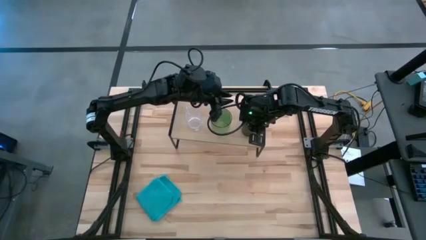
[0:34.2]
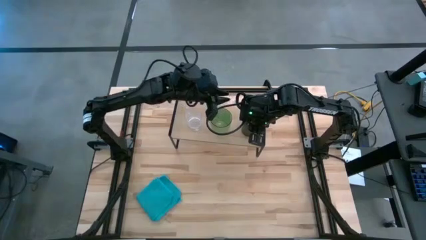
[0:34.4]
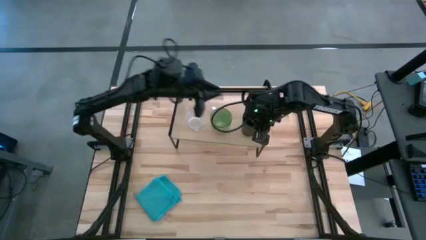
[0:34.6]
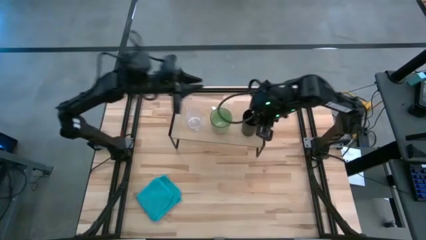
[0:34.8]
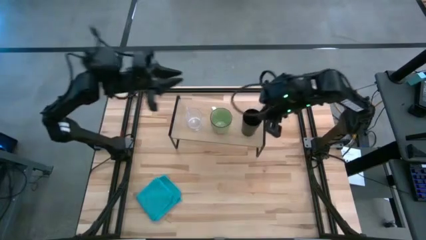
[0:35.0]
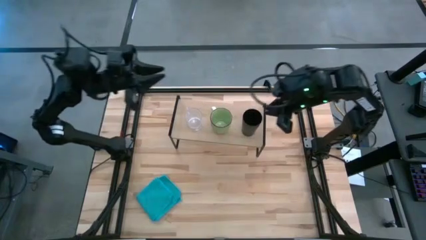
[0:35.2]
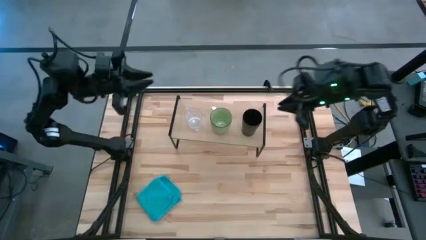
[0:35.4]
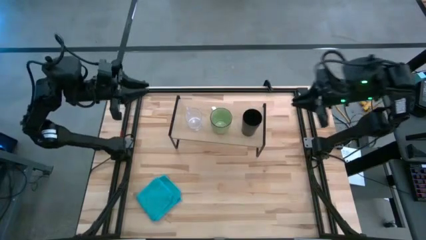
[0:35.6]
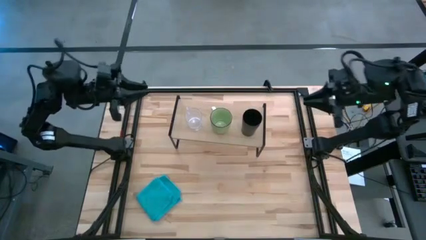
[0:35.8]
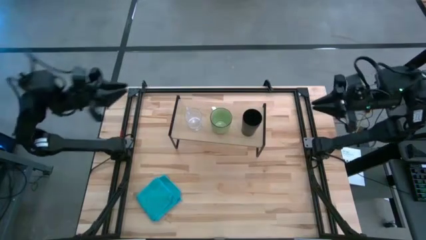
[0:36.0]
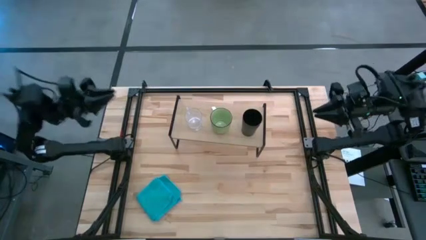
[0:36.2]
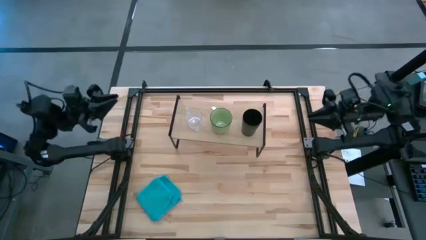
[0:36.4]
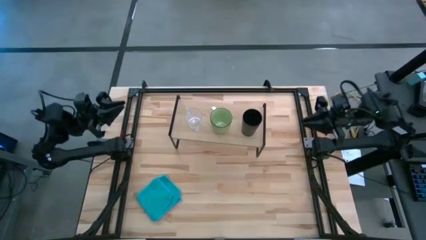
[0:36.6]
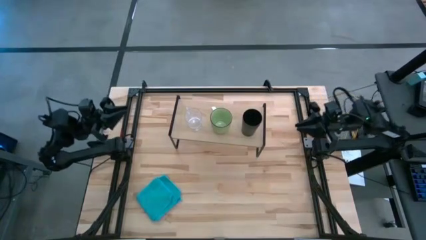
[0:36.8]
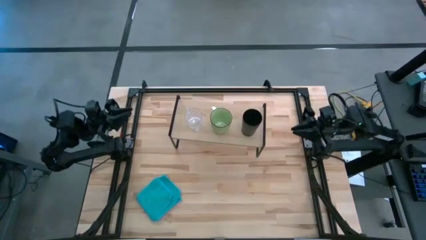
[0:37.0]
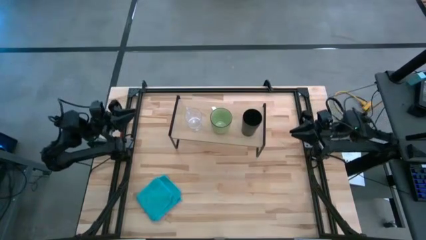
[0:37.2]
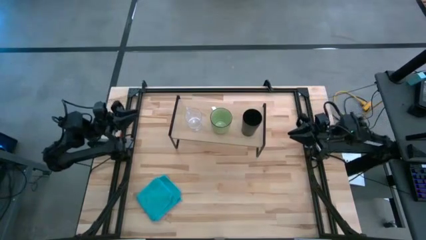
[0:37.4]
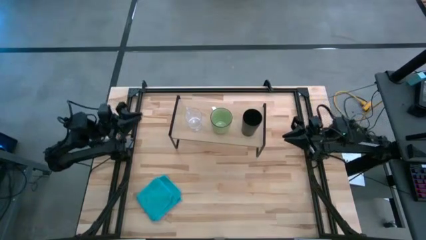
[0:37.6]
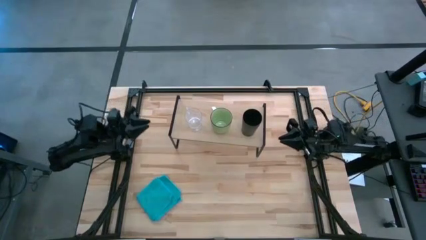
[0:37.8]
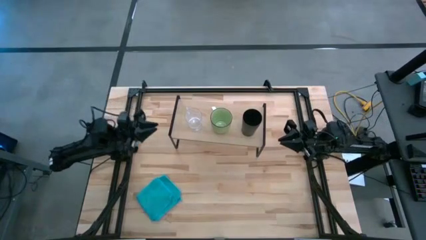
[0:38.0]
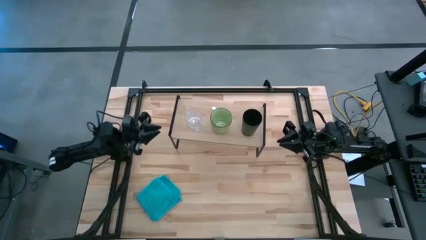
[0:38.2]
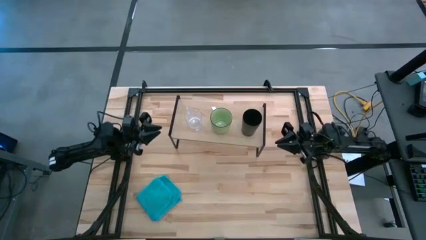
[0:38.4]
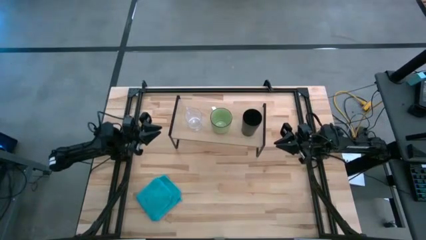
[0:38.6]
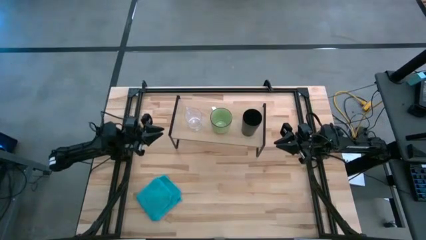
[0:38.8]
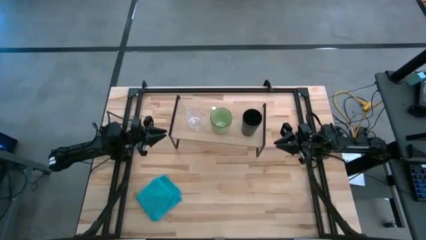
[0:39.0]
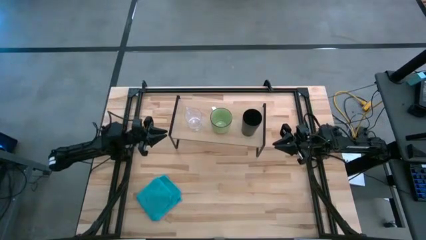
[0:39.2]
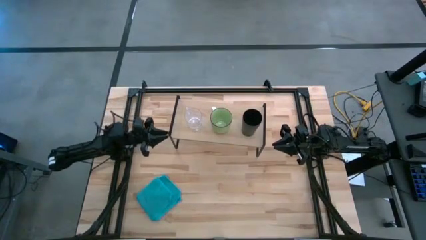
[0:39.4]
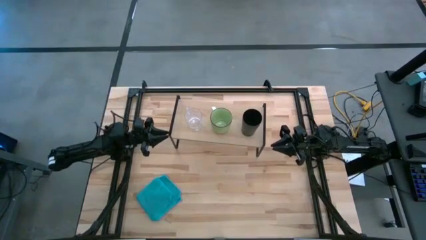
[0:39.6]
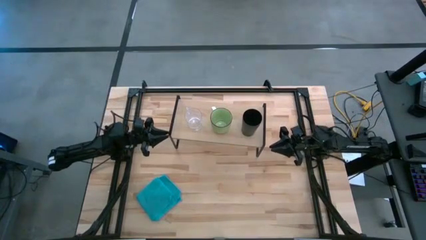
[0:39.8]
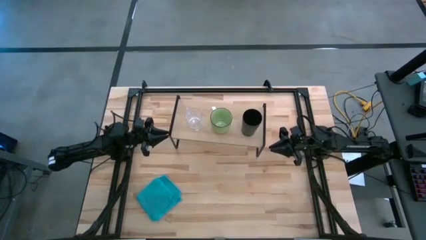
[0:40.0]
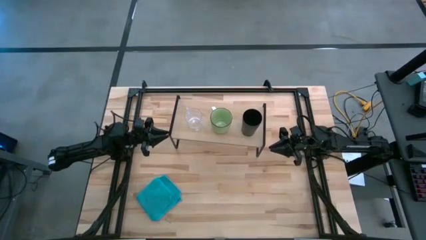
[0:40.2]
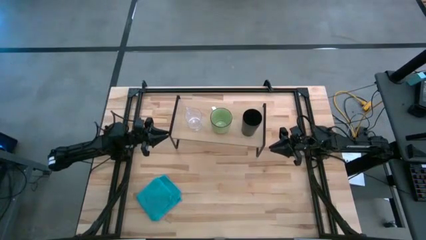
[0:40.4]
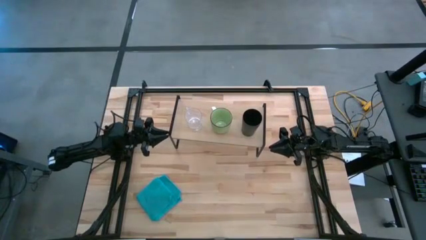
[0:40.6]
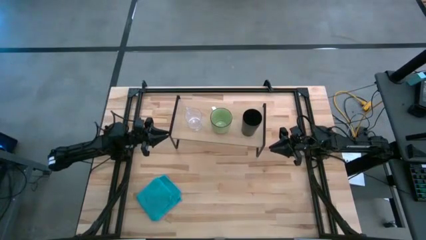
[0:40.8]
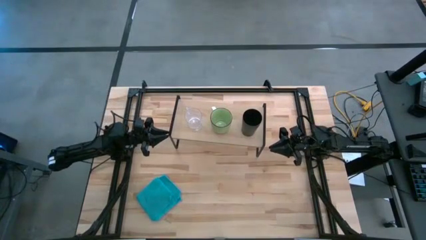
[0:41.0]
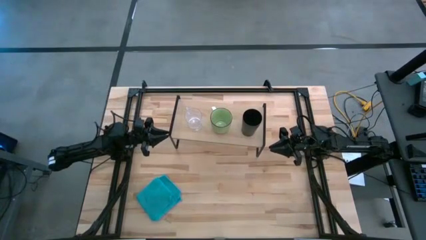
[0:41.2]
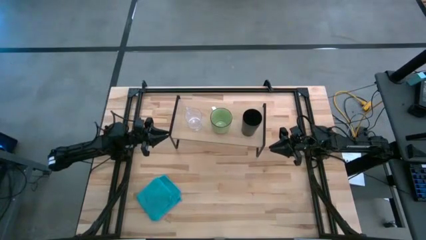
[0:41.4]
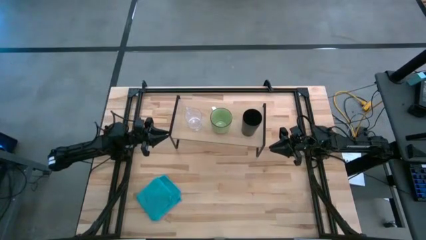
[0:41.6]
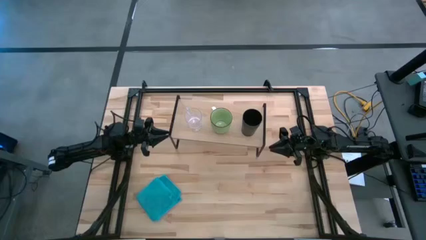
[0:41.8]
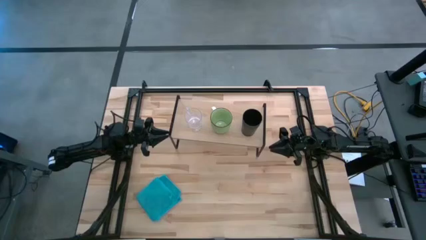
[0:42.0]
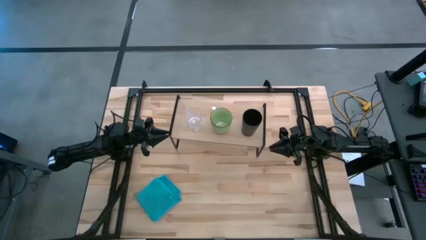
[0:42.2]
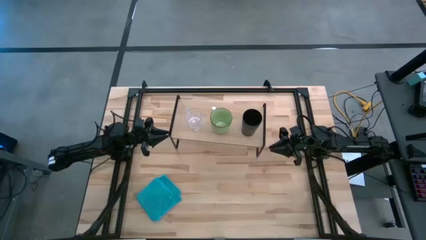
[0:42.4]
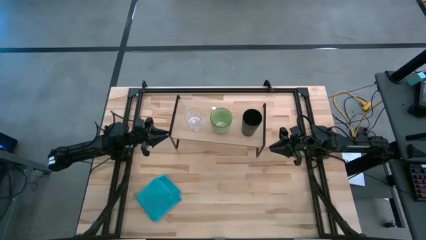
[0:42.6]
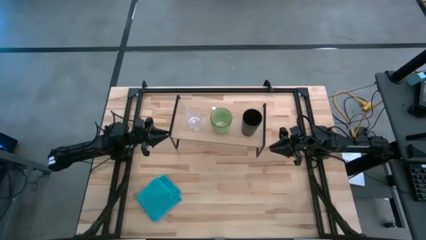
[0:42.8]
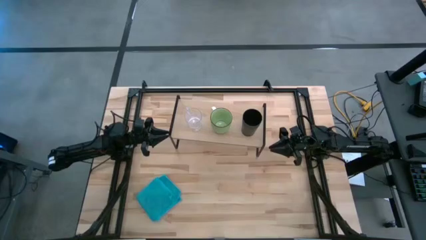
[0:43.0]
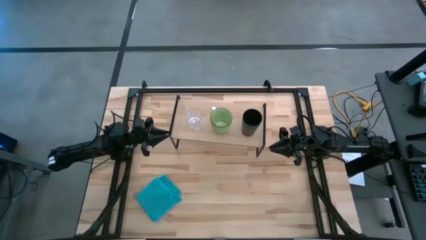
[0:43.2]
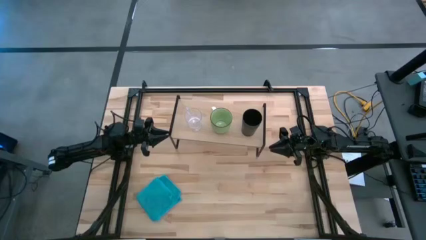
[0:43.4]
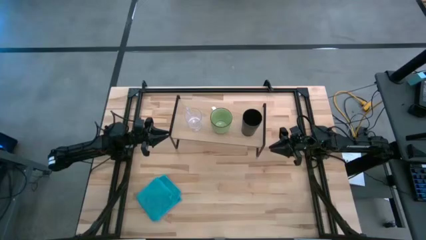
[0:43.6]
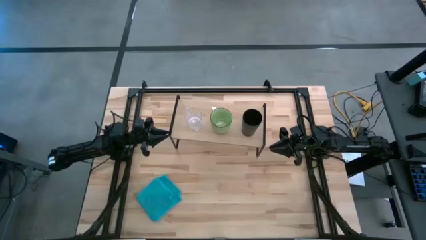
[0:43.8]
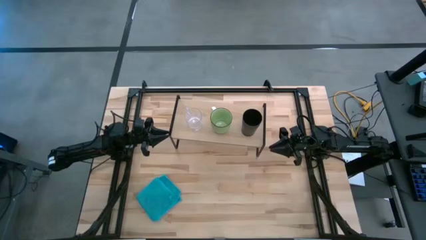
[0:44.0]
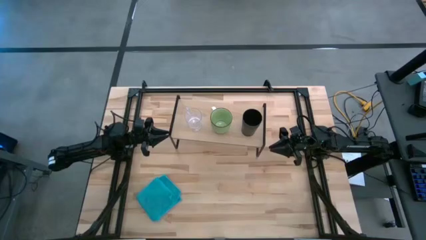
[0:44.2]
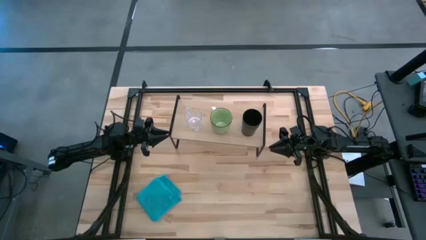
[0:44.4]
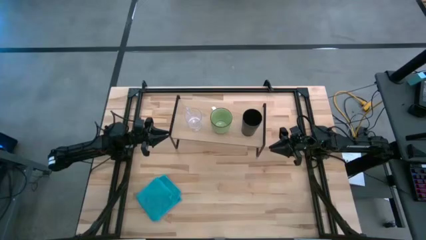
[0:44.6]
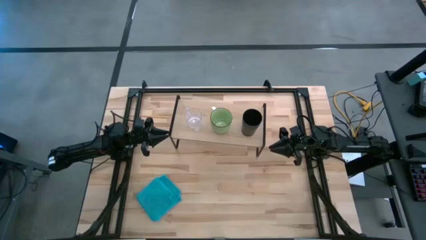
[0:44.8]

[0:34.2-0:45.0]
Task: Stack small to large cups/mugs on shelf
Return to Home Position
